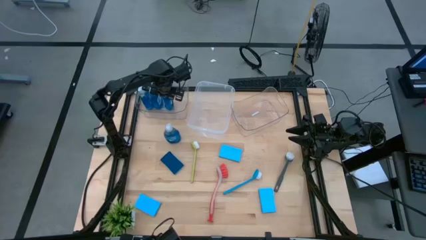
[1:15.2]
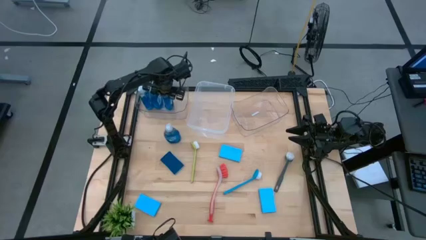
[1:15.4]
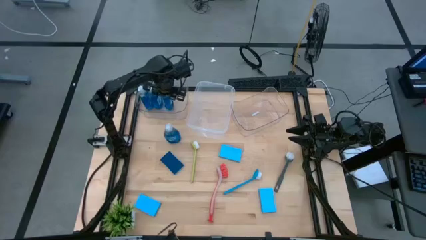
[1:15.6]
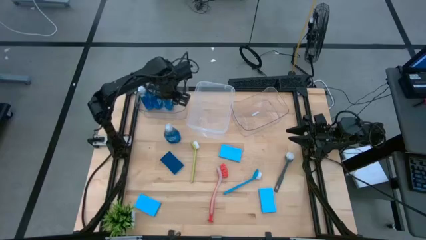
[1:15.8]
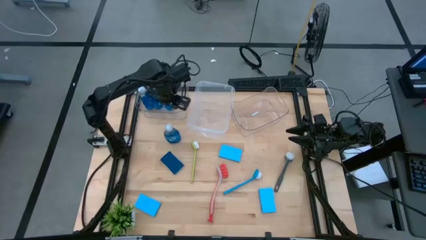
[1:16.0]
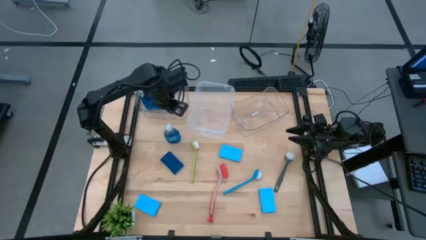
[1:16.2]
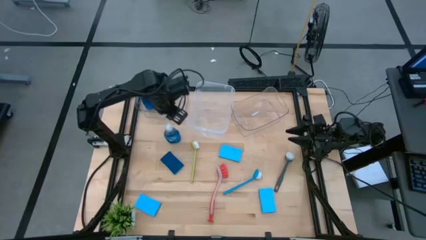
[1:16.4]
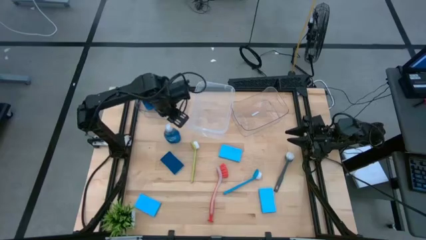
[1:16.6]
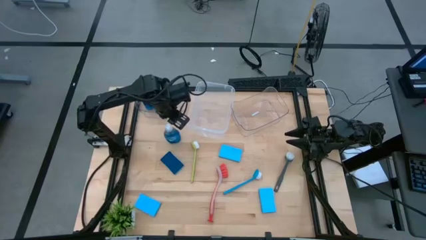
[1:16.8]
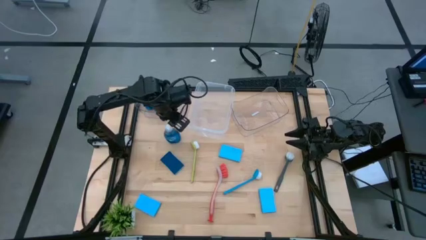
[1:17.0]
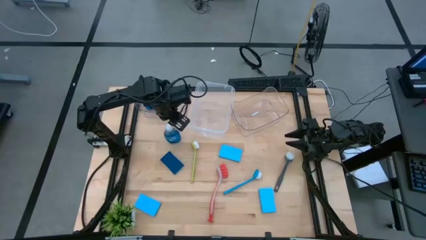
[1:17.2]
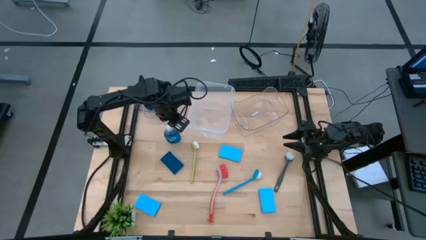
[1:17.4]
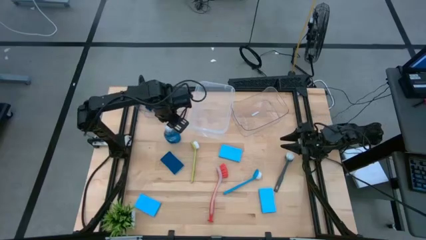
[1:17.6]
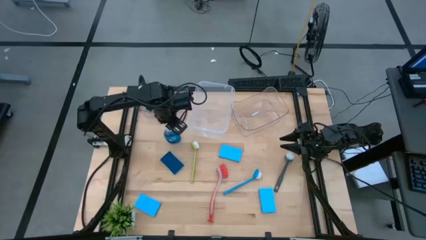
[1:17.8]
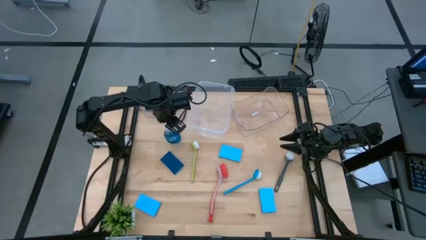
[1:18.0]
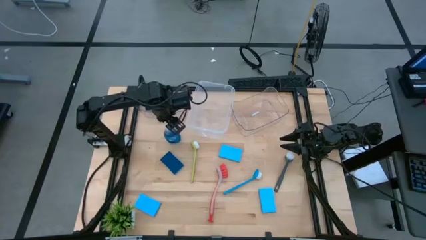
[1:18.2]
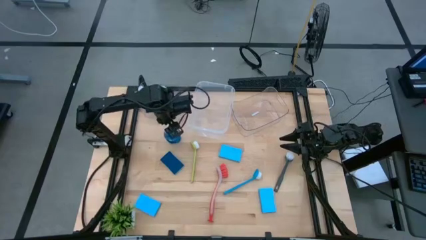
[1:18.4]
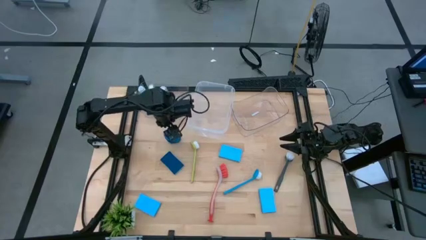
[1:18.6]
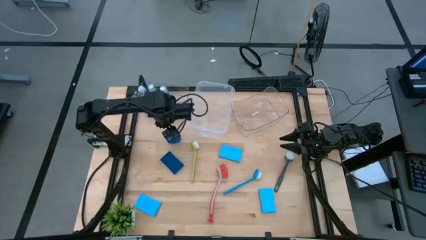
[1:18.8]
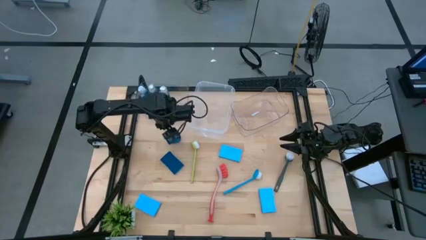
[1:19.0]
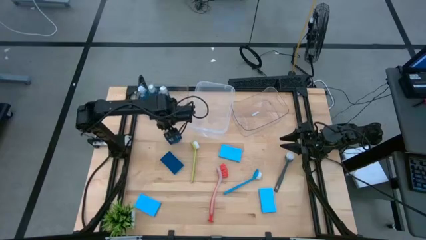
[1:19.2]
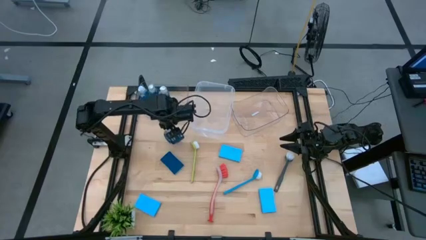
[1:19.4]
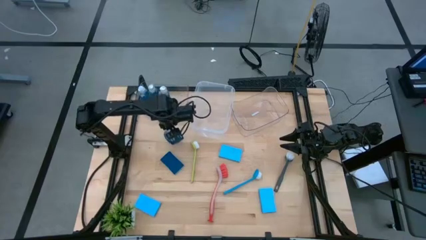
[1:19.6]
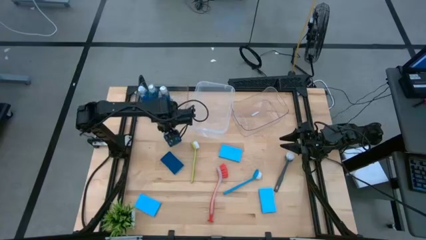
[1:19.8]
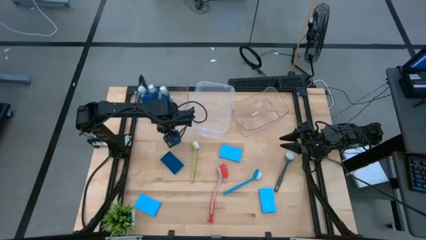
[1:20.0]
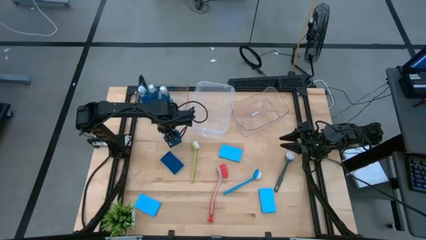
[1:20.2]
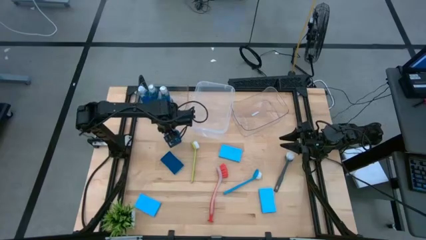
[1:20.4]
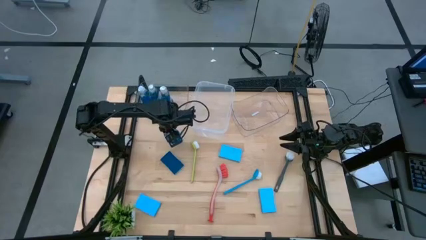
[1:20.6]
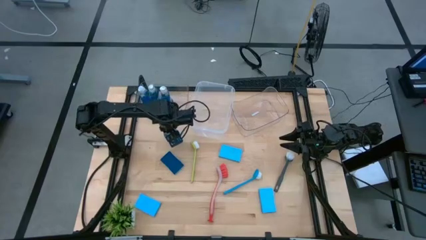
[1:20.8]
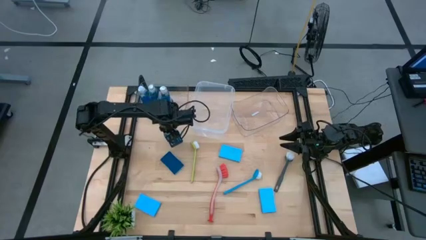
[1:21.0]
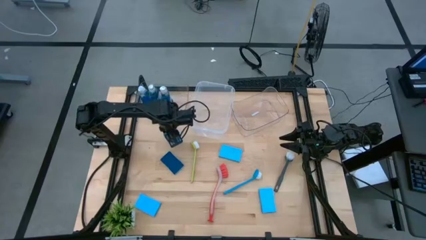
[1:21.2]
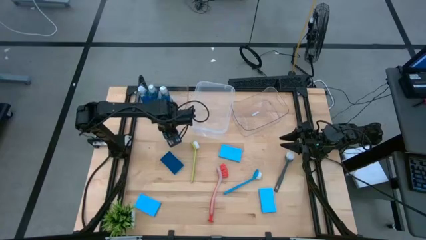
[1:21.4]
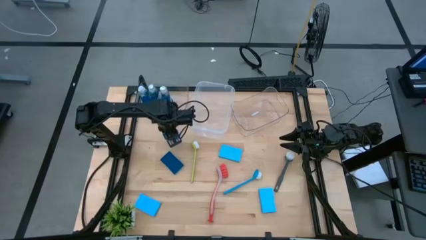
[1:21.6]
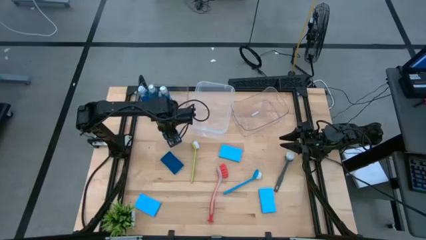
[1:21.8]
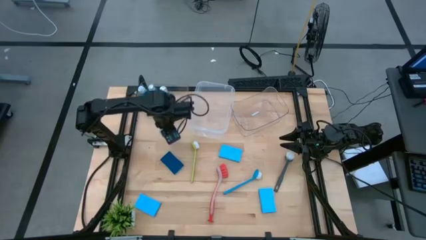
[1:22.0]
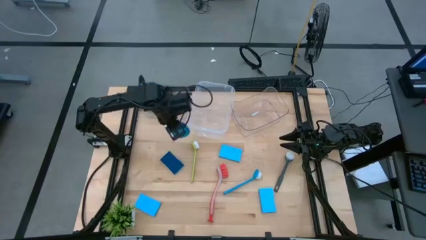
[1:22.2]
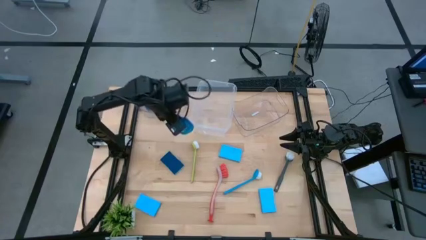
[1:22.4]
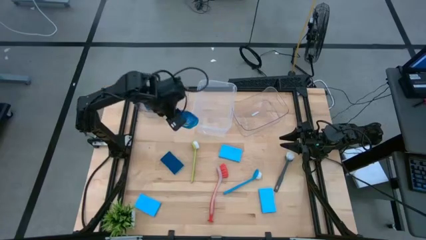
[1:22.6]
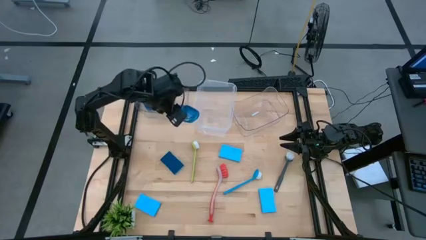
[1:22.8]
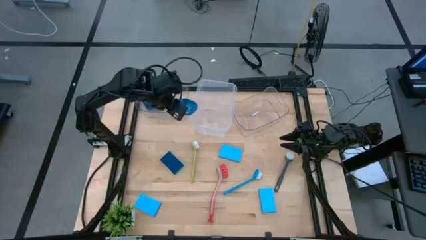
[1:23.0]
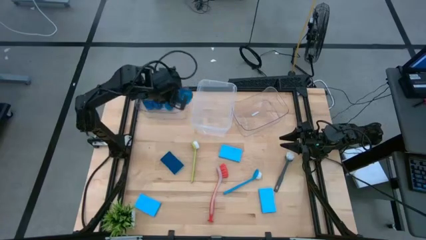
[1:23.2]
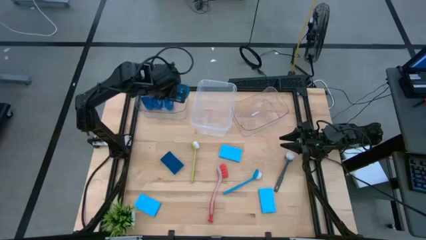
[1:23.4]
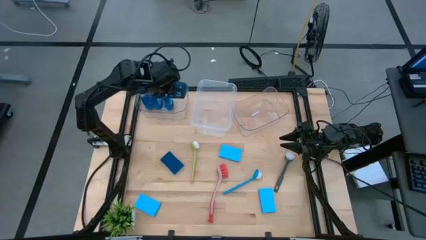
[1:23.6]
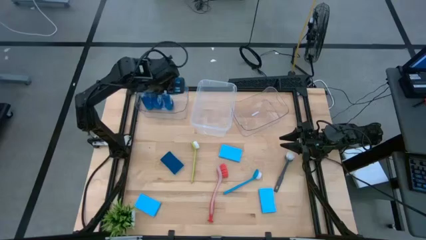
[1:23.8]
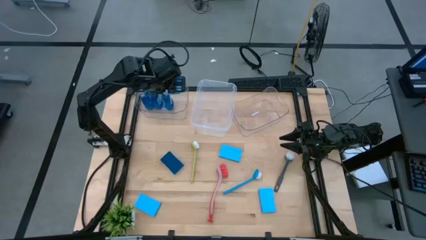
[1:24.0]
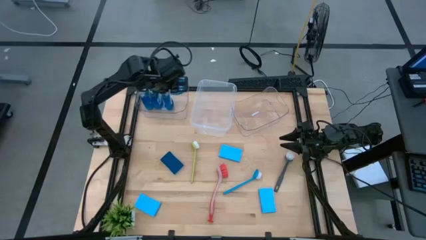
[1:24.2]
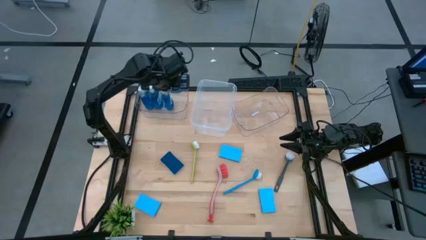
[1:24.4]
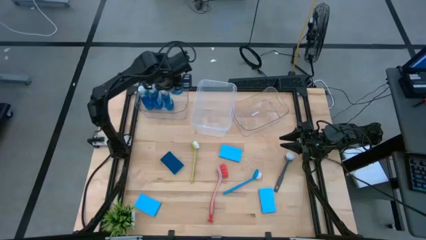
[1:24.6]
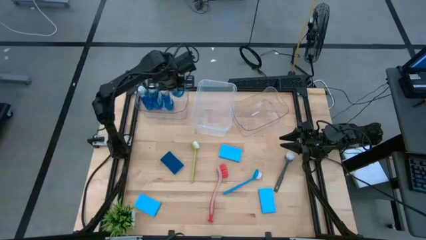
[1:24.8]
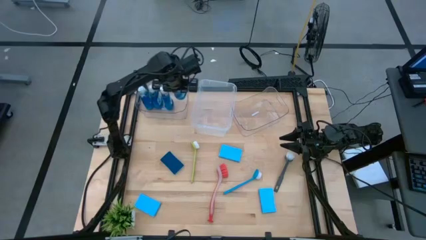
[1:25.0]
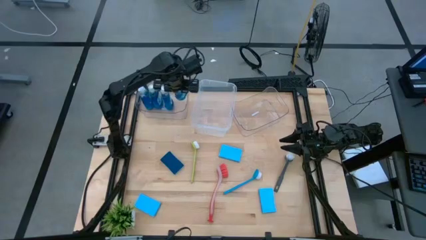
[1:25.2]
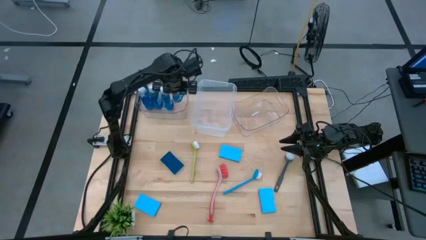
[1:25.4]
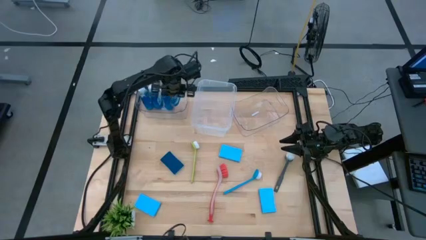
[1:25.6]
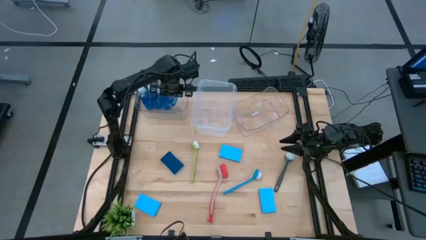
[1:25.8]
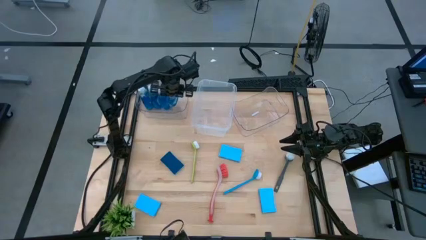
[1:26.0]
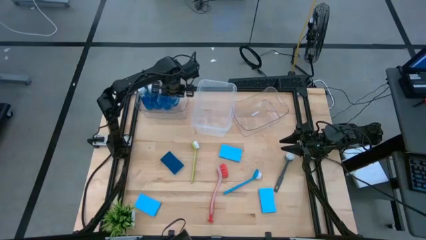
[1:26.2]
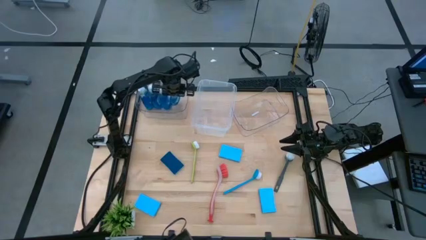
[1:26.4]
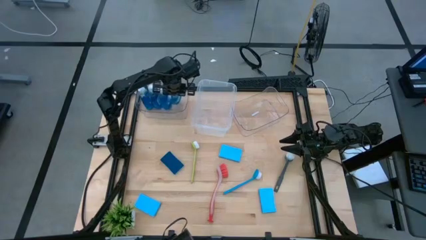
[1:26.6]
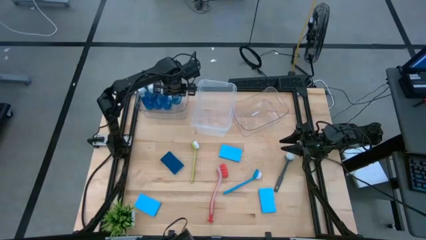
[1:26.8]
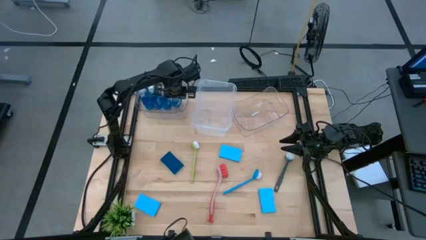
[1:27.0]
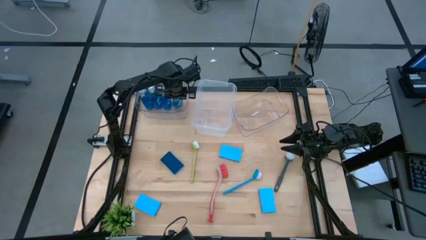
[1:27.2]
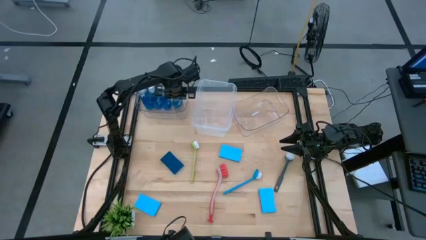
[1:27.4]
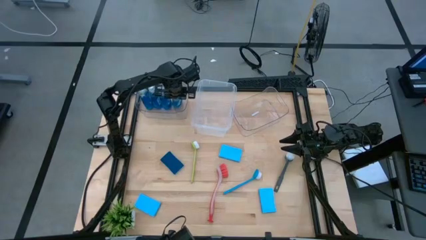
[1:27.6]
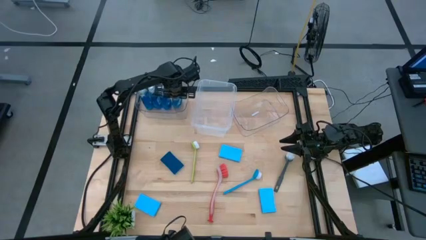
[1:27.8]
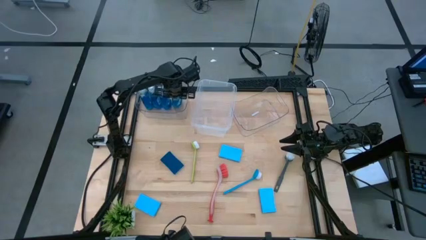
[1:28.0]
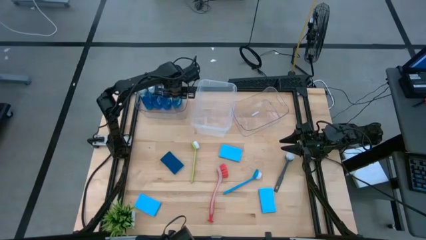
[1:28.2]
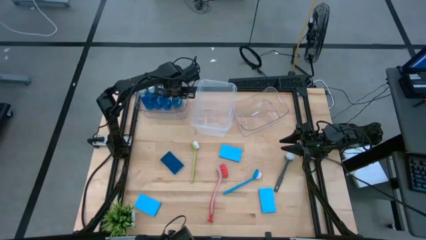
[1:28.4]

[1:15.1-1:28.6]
Task: Pick & Place Kitchen Sink Supplies
Put the dish soap into the left transparent bin

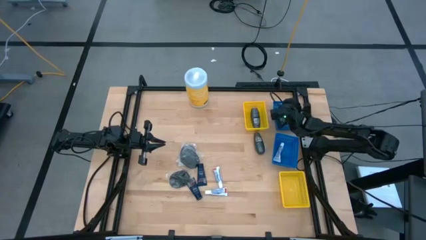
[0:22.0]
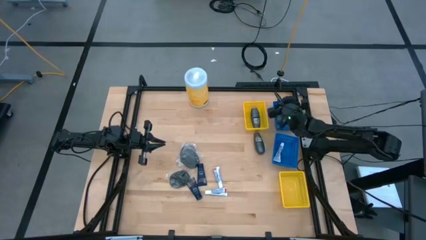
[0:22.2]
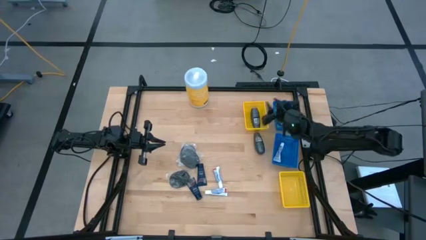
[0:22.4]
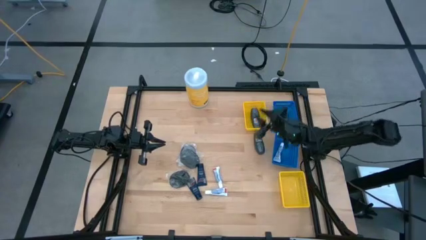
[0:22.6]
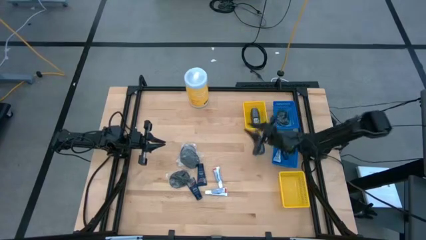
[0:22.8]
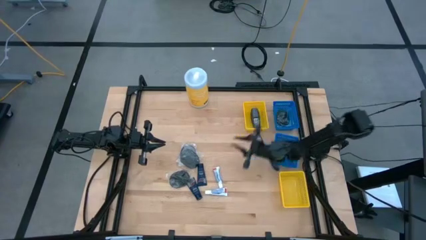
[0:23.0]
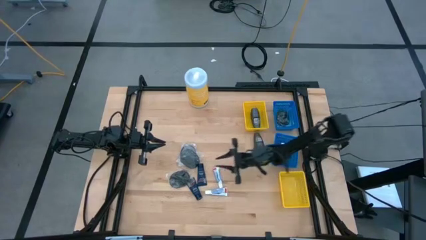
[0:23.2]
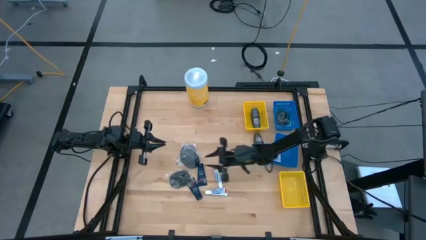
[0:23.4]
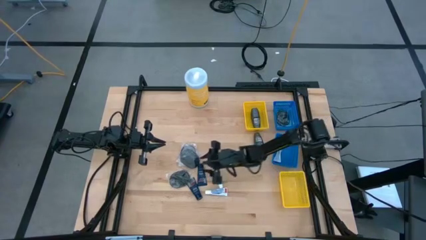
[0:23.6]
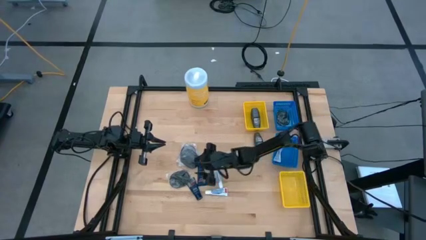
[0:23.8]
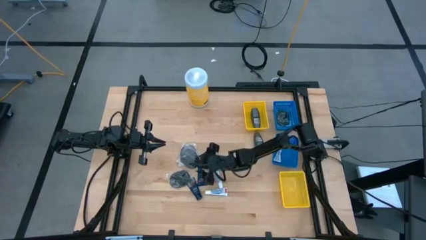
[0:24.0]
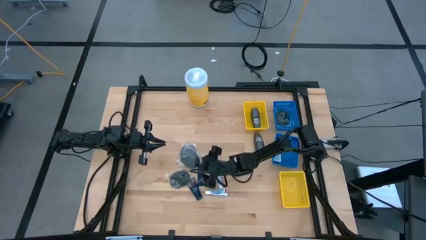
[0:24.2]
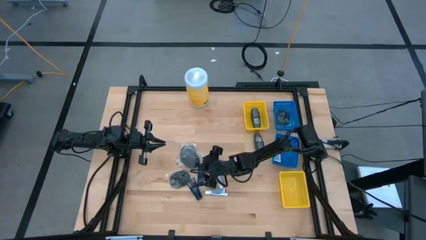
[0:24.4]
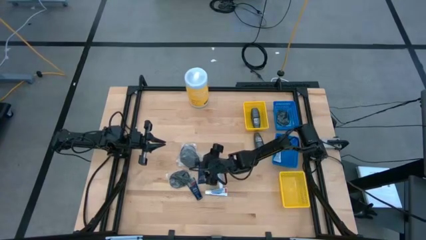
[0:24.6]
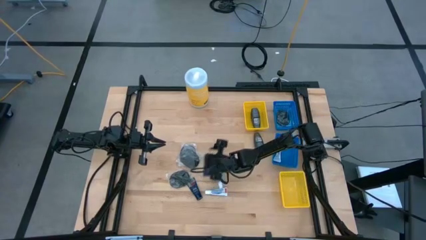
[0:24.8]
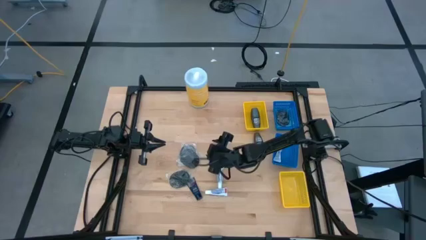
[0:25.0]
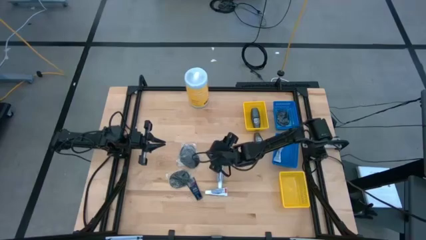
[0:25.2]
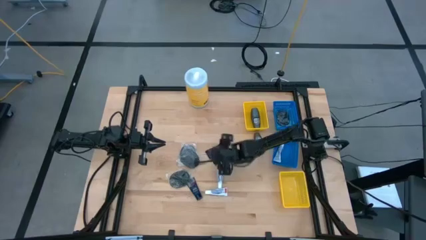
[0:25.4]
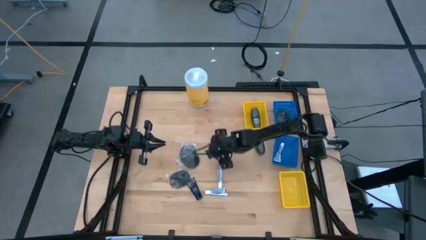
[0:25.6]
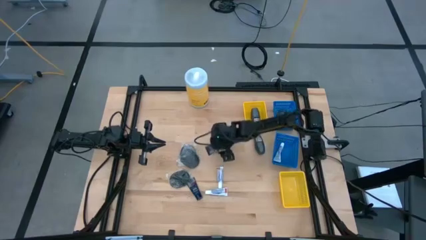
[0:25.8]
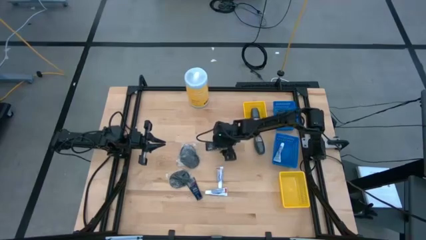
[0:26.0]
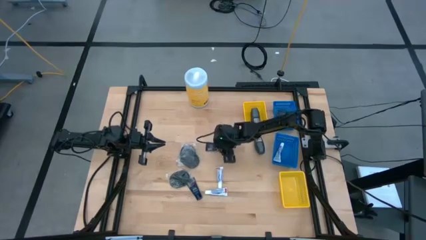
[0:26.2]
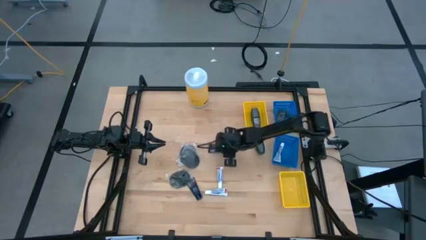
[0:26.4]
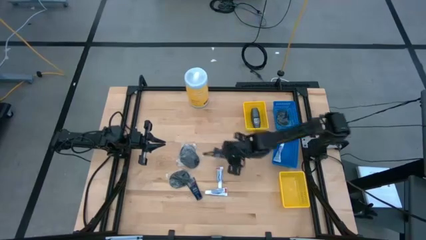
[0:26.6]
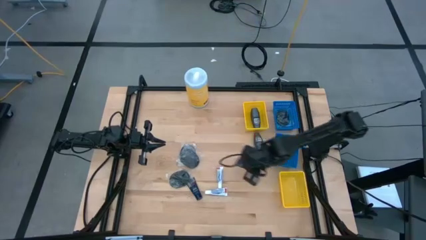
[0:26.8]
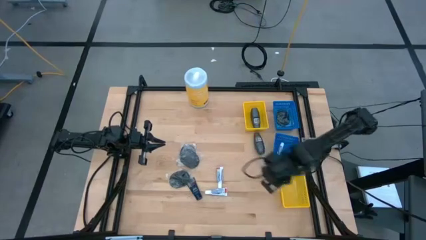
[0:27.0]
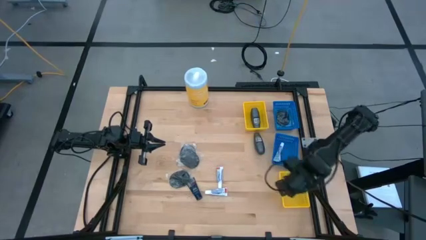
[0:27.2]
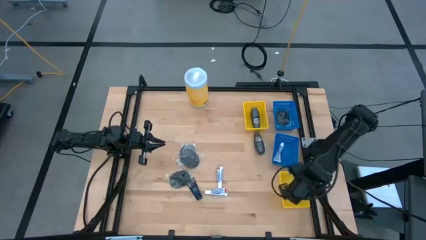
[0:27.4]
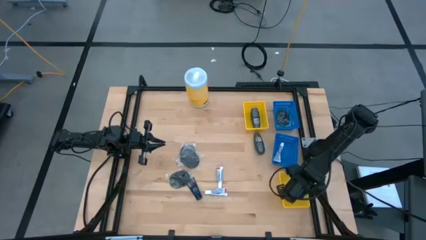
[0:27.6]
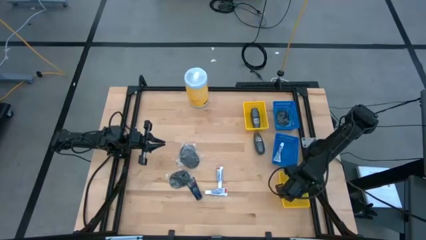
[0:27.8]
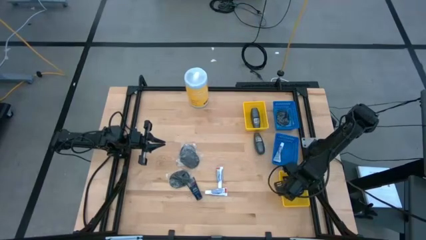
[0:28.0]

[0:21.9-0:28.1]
Task: Pick & Place Travel size toiletries
Put the right blue shave cream into the bottom yellow basket
